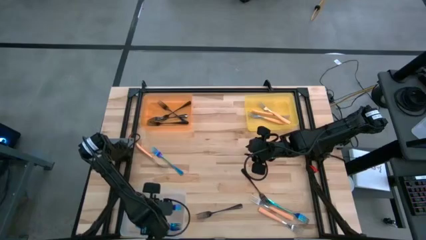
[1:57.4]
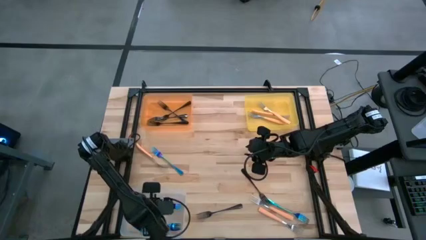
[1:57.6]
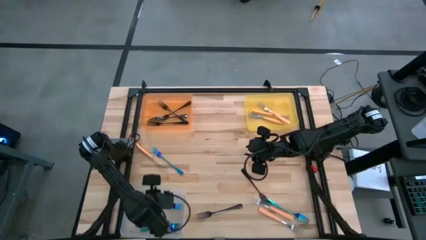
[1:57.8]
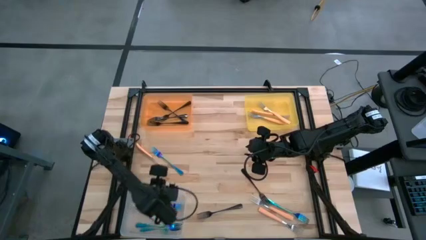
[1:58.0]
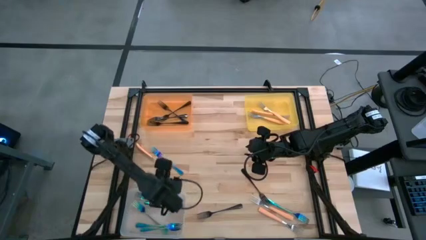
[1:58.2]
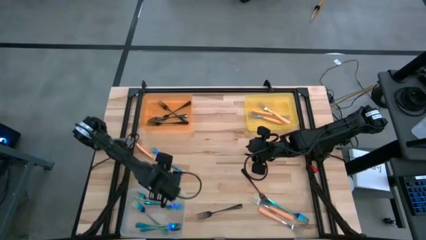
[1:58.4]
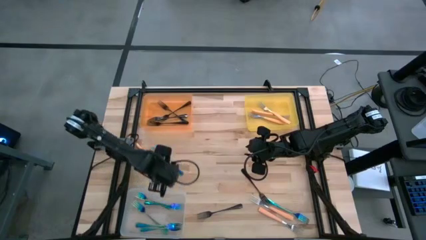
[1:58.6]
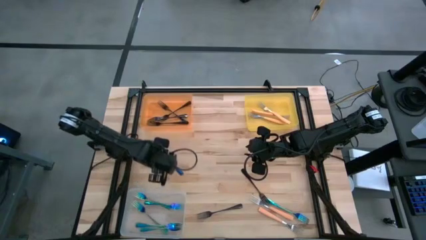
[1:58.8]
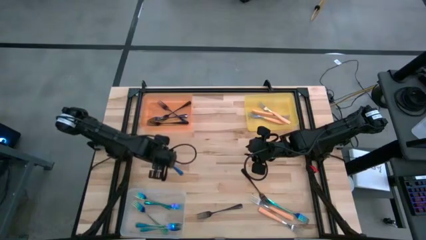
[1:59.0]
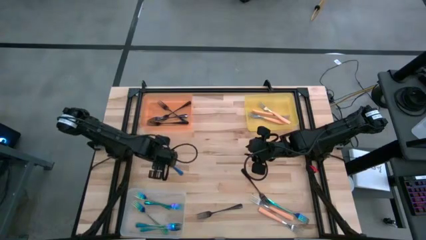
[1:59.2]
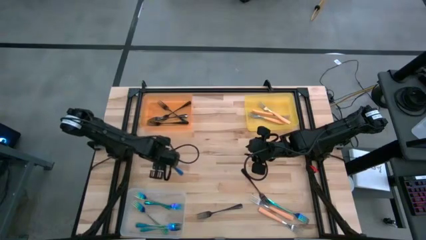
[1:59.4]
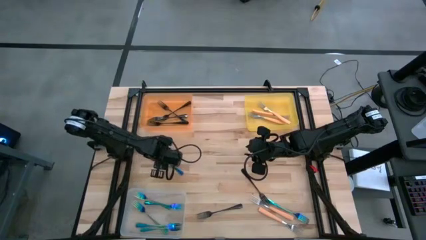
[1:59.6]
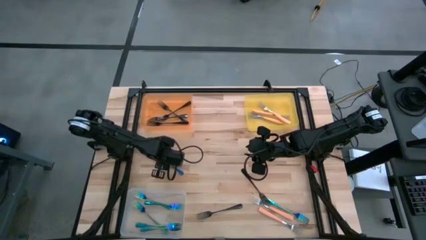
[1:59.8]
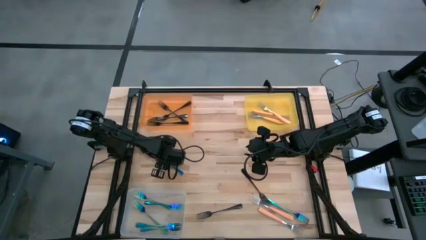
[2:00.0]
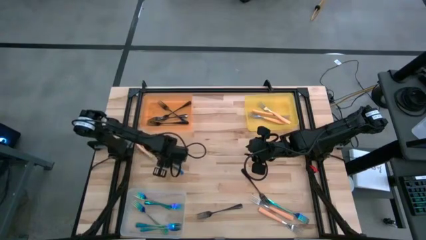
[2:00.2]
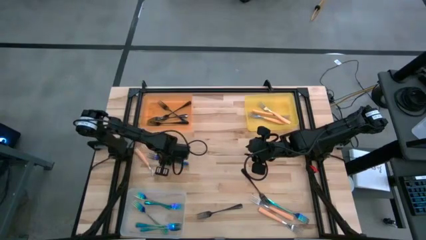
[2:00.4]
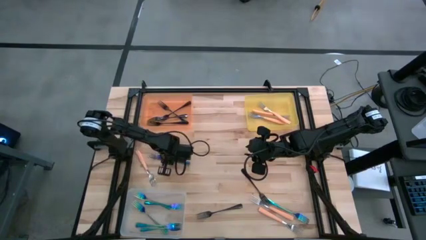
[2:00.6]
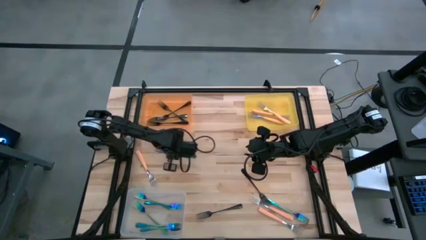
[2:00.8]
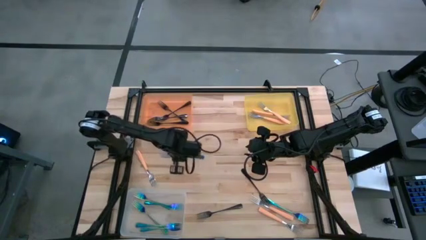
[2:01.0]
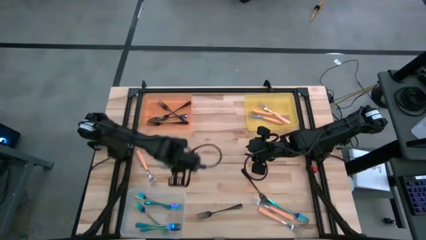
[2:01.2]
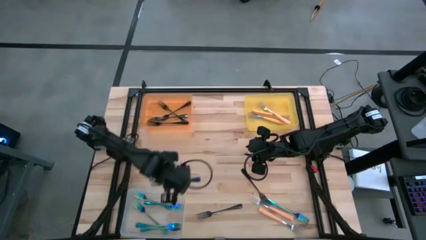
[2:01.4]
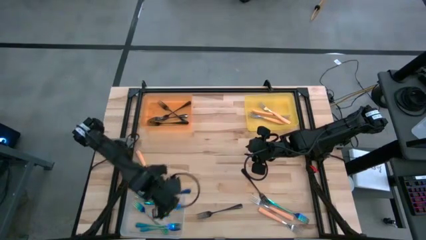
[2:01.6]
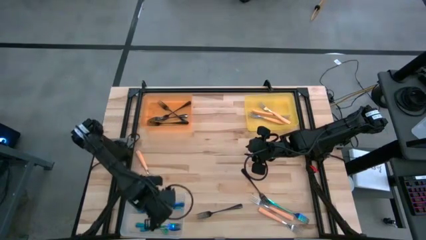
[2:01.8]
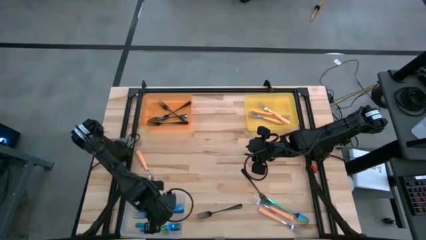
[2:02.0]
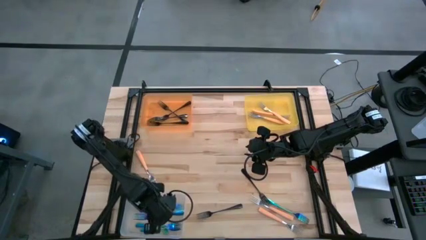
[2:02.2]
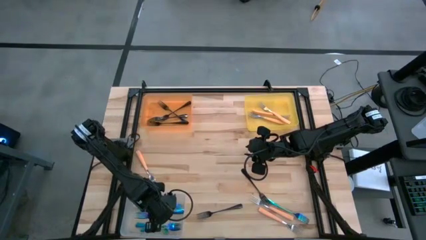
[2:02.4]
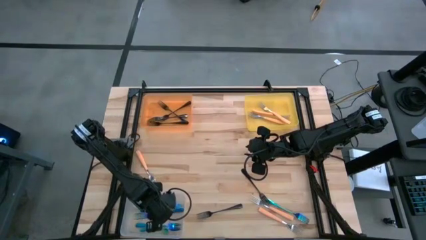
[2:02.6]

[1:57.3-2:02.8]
Task: Sort silverware by color (type)
Put the blue fork into the transparent bin

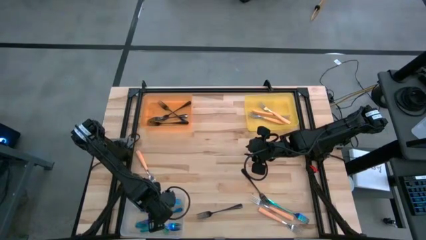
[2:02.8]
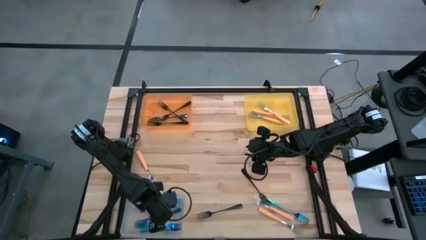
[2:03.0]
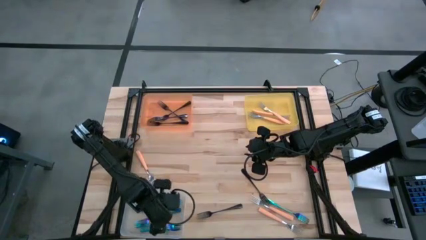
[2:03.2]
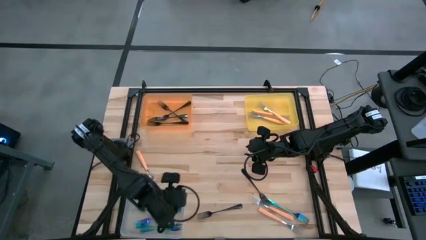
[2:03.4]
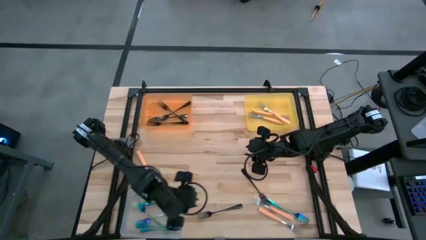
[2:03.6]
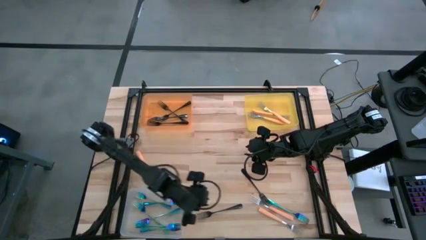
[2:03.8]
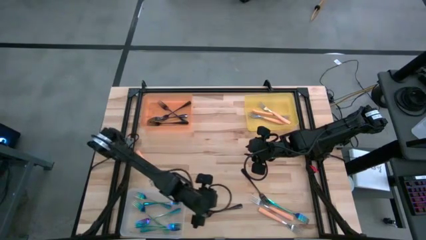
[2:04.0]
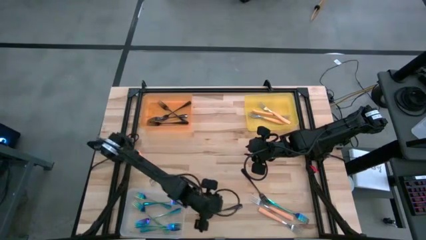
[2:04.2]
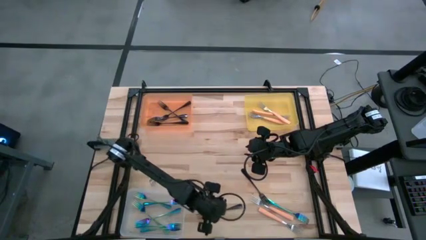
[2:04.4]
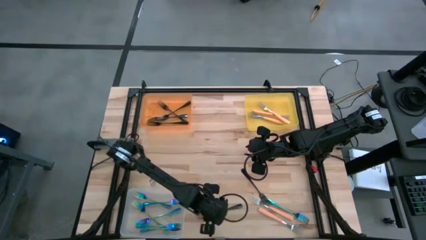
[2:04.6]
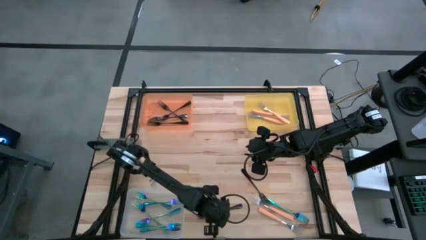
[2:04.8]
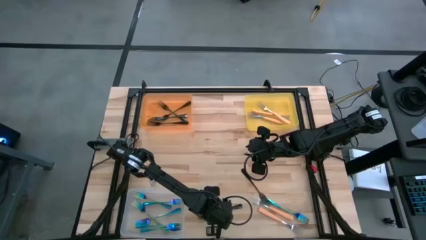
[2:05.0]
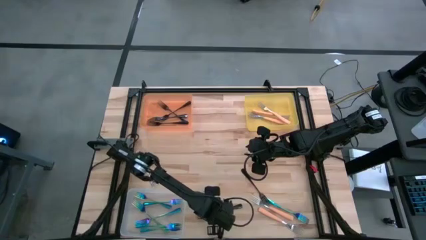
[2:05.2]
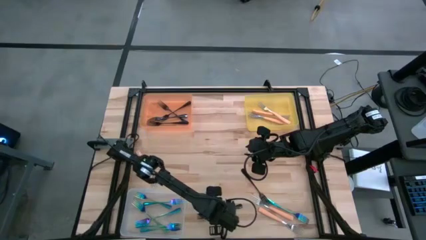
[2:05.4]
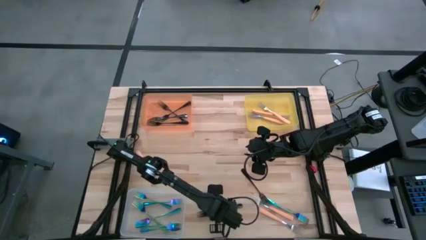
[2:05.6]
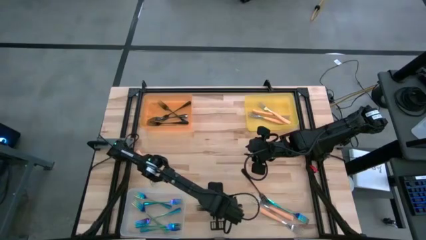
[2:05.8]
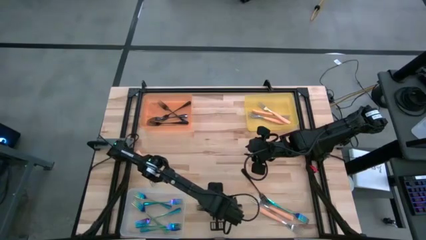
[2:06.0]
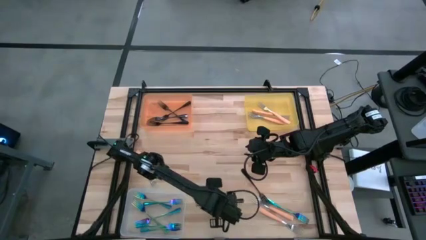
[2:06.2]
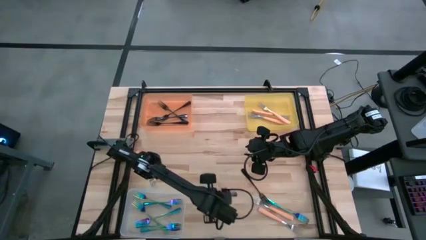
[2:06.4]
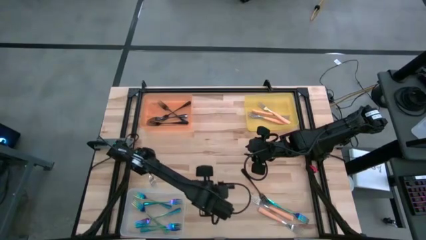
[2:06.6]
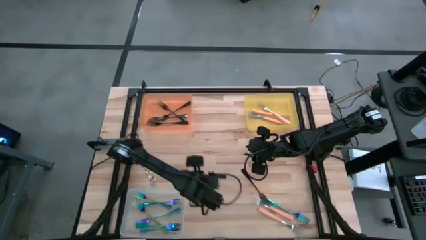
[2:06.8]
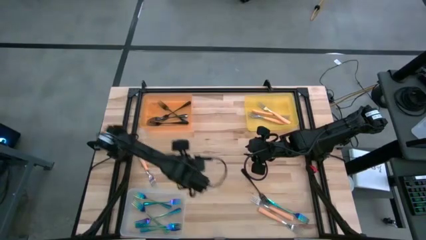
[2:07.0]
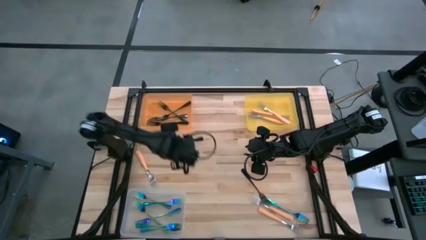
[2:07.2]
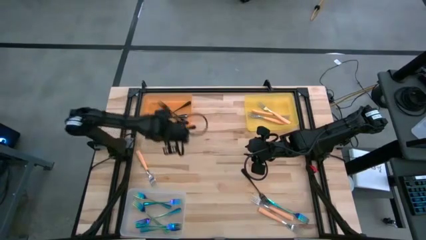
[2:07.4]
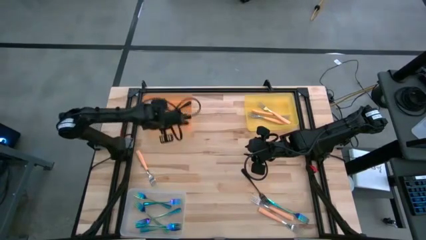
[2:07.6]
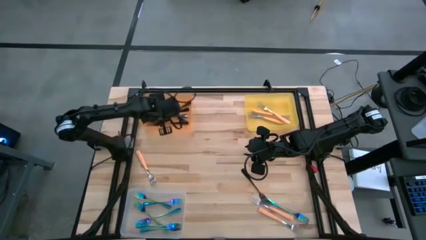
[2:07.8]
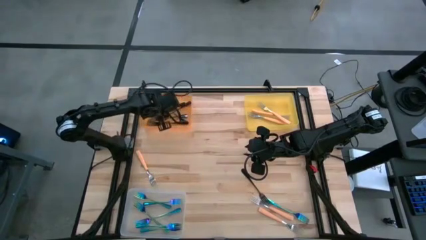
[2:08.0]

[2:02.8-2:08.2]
Put the black fork into the orange bin

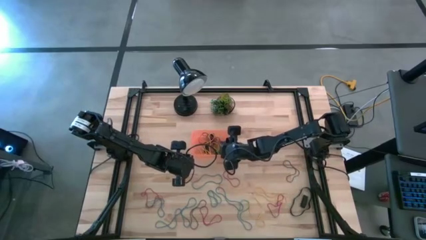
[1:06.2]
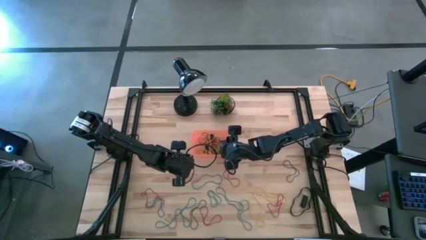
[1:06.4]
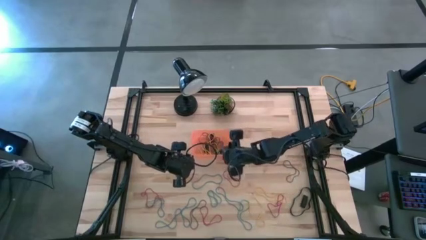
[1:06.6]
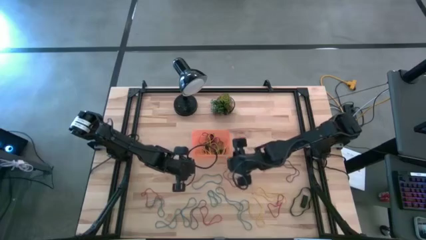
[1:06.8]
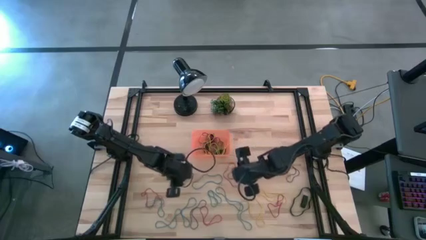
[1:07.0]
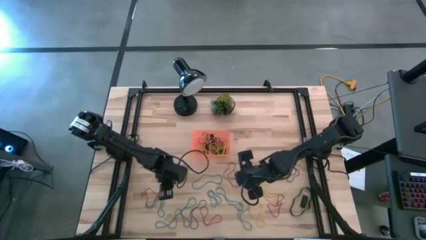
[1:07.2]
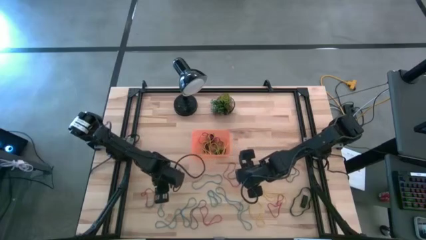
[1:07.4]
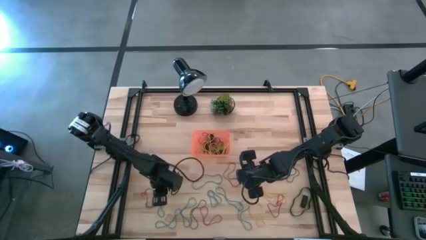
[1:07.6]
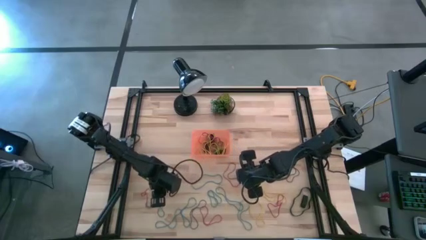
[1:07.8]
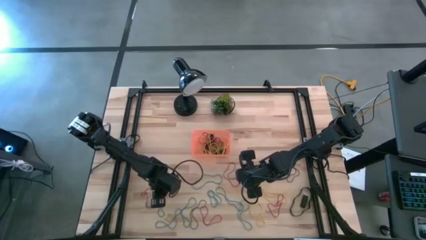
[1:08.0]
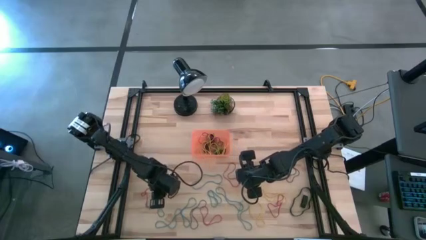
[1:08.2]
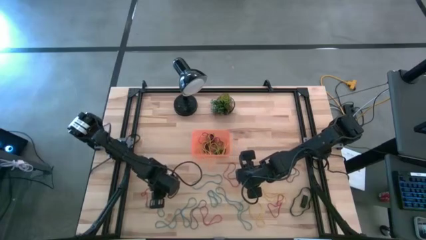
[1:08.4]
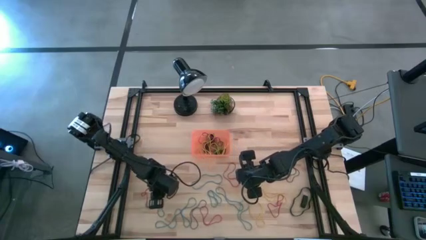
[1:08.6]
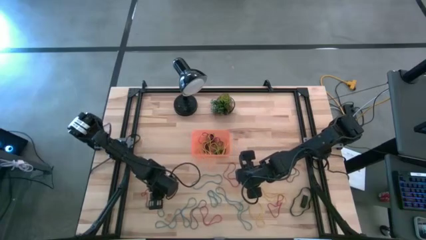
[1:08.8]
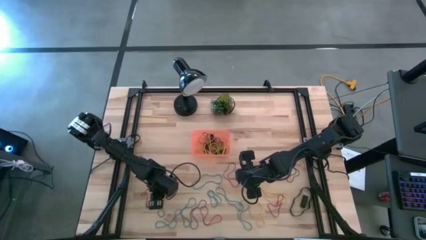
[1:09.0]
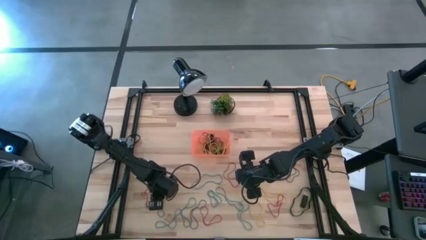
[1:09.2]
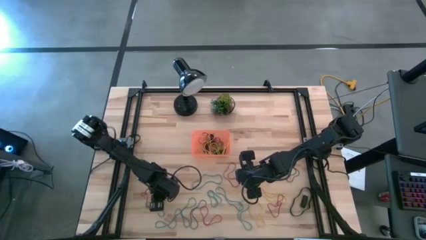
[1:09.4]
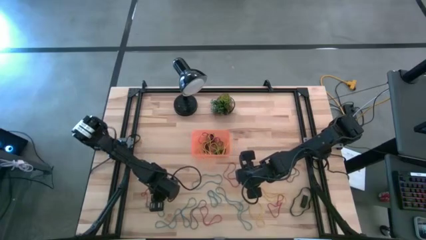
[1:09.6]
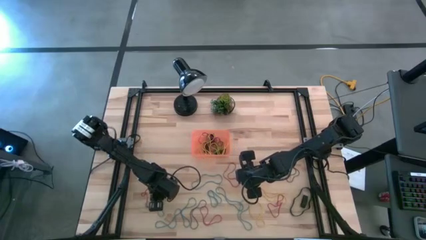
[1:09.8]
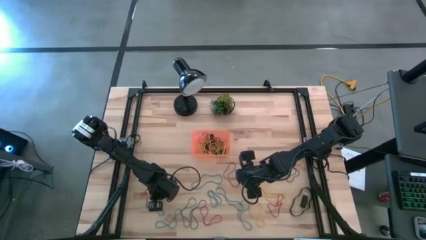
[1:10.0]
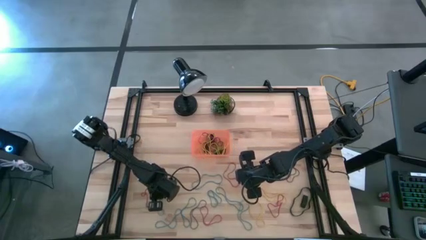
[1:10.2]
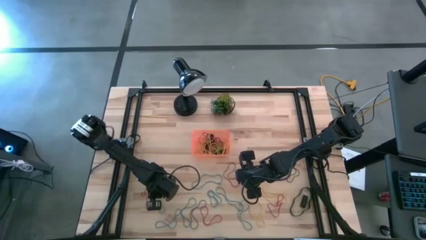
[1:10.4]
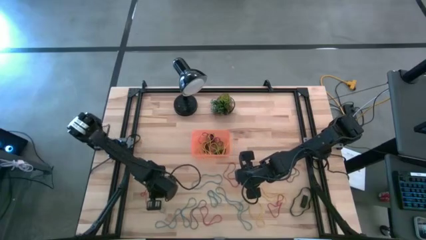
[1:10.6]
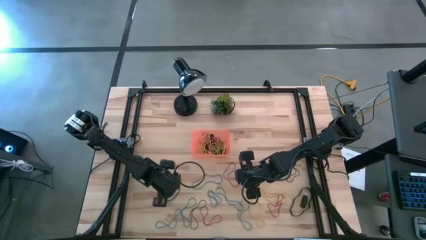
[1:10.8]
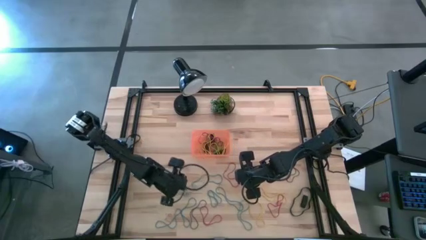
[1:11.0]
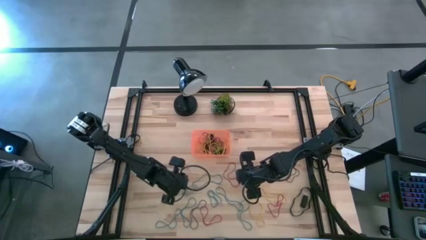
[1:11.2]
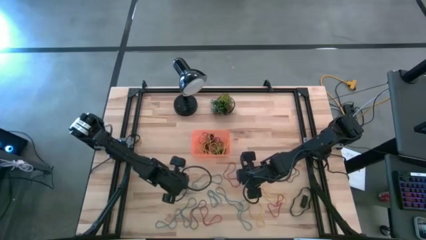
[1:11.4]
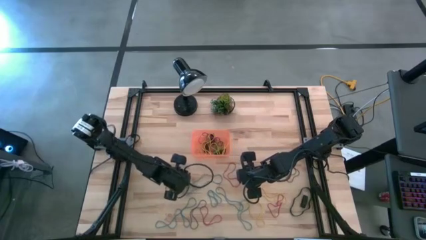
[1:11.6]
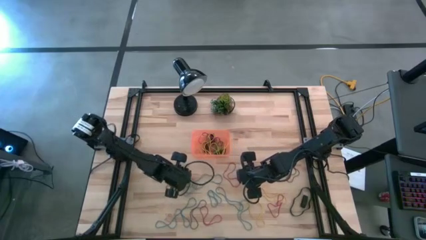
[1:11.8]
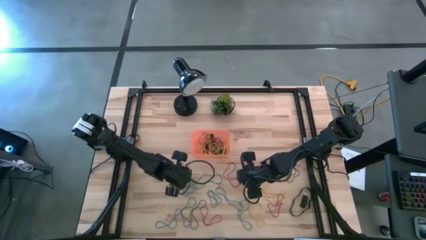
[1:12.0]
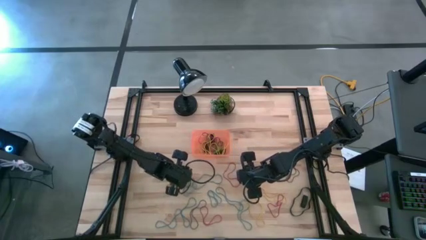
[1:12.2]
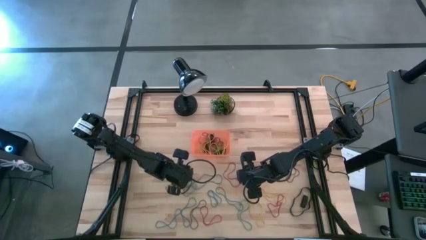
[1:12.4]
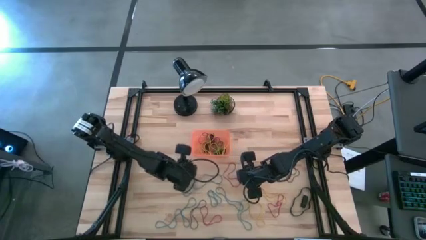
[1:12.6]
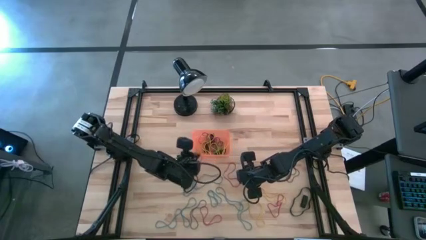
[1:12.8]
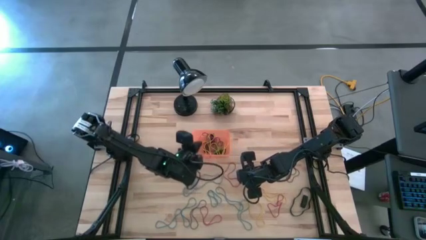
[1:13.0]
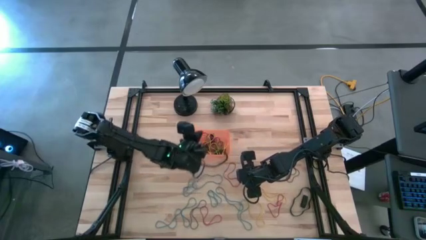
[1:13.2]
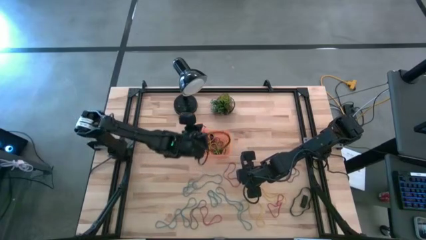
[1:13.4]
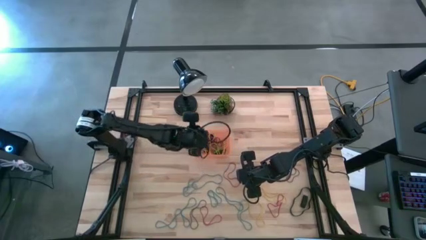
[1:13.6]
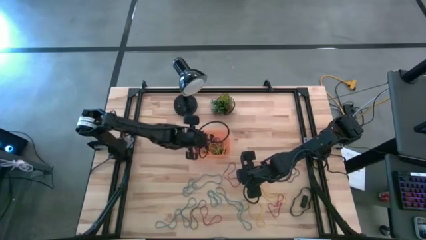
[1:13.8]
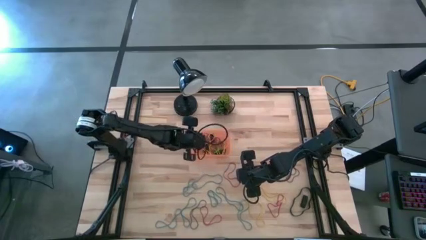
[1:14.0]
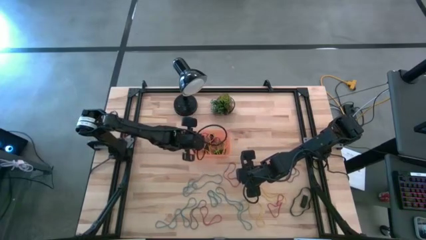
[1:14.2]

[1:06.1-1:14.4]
Task: Pick and place rubber bands into bin
Put the red rubberband into the orange bin
